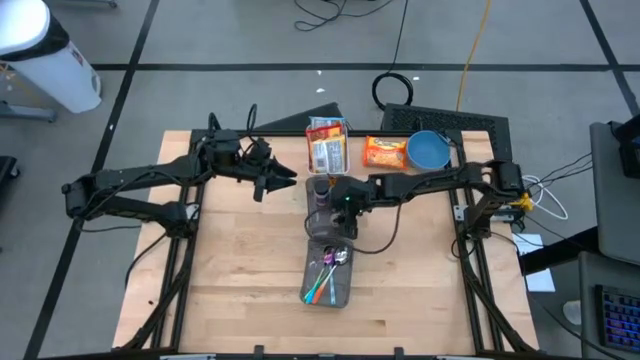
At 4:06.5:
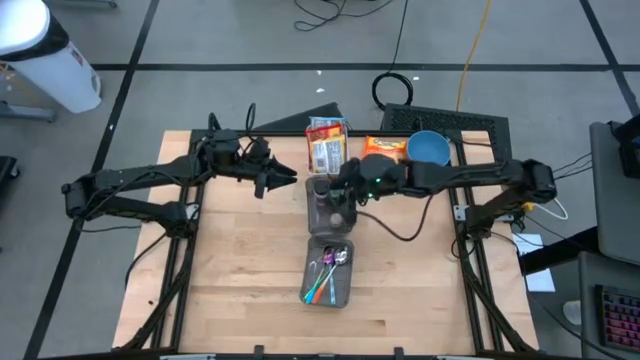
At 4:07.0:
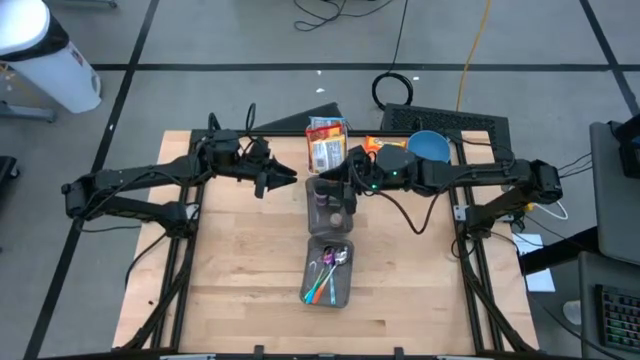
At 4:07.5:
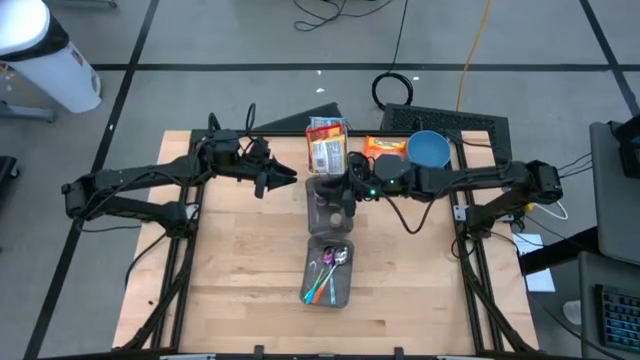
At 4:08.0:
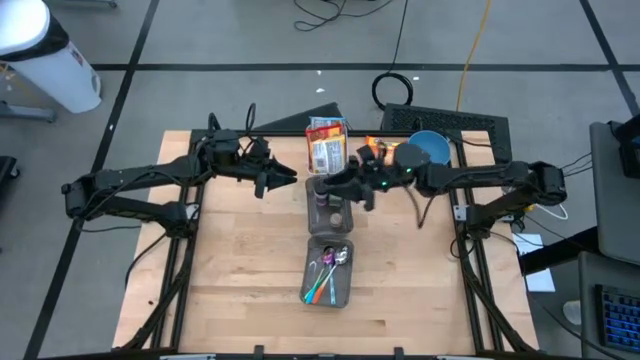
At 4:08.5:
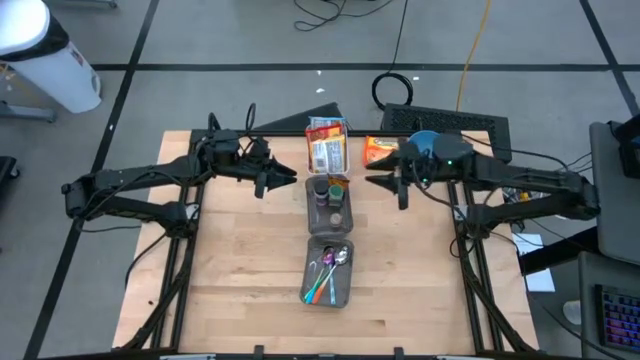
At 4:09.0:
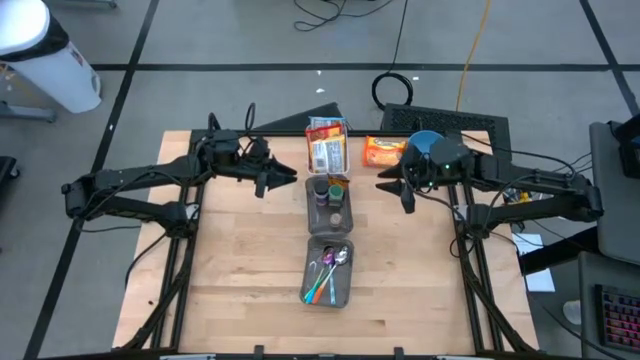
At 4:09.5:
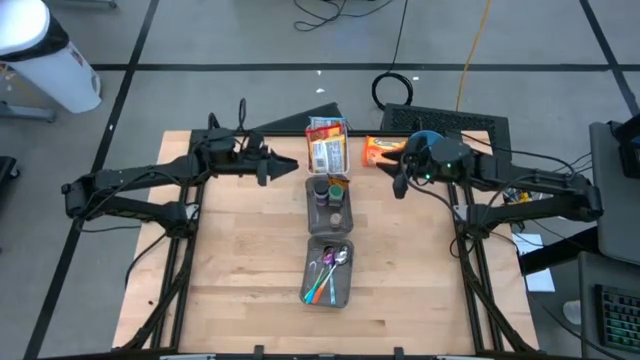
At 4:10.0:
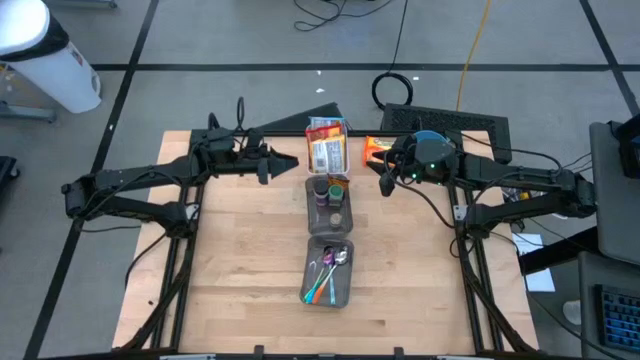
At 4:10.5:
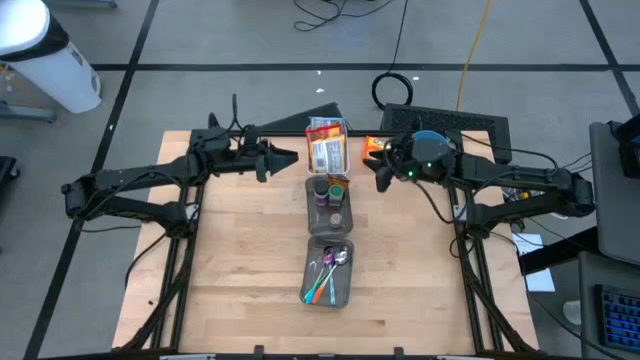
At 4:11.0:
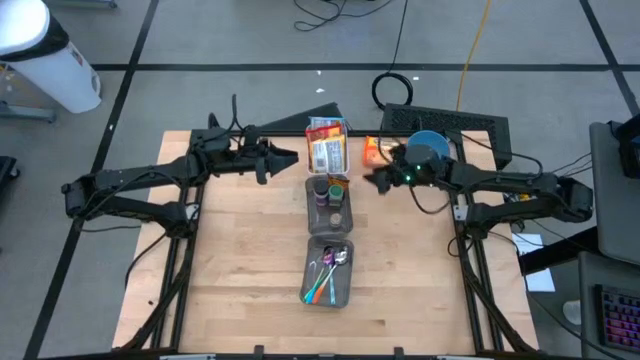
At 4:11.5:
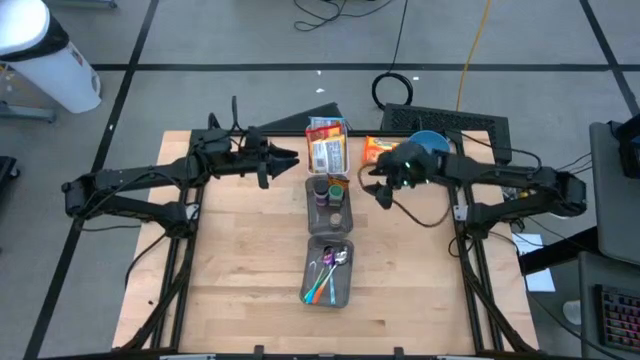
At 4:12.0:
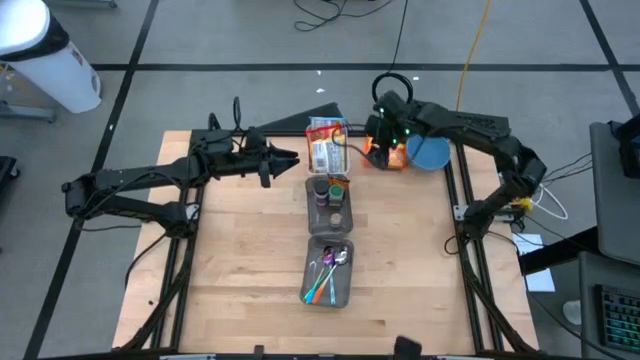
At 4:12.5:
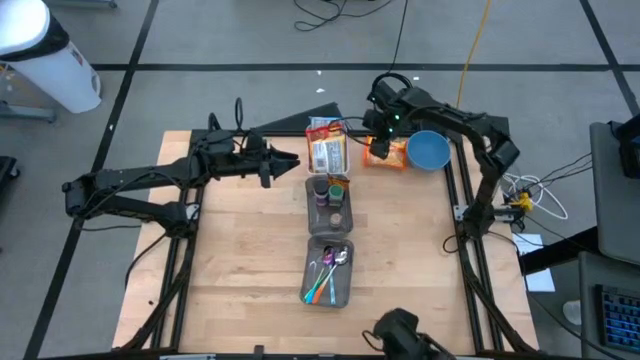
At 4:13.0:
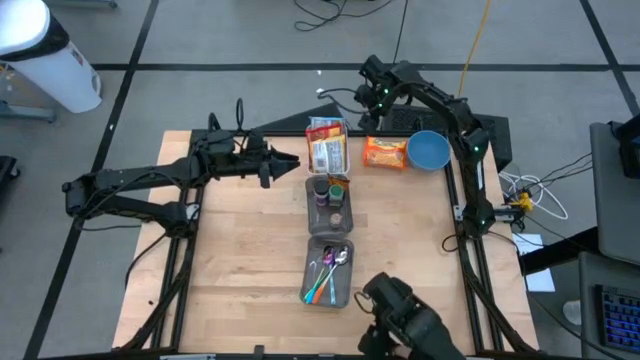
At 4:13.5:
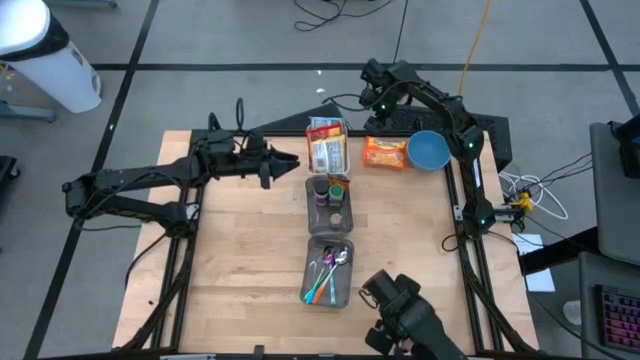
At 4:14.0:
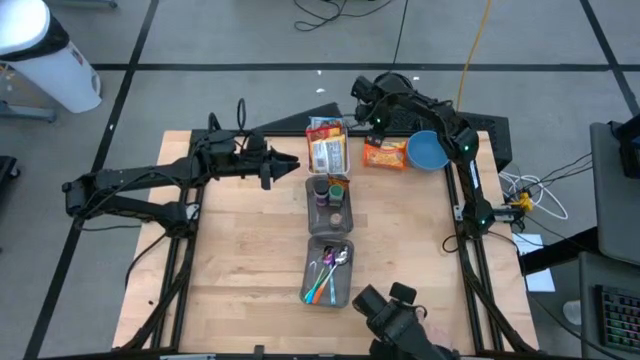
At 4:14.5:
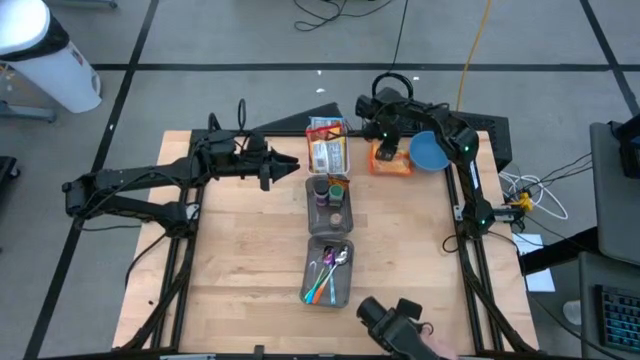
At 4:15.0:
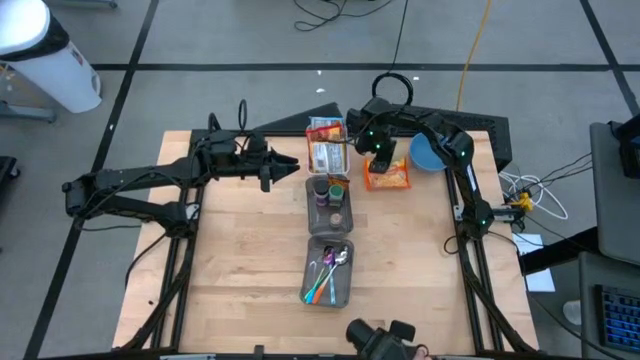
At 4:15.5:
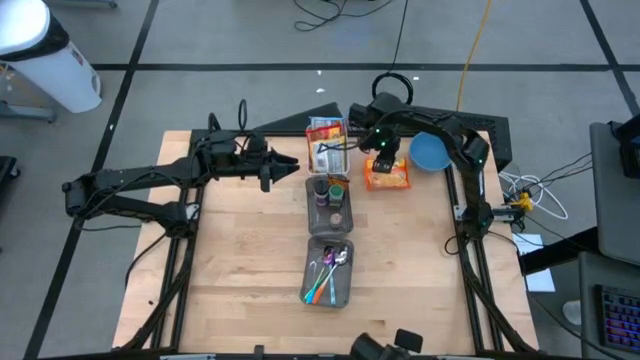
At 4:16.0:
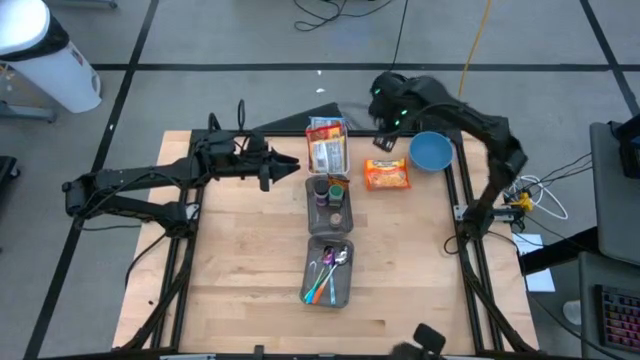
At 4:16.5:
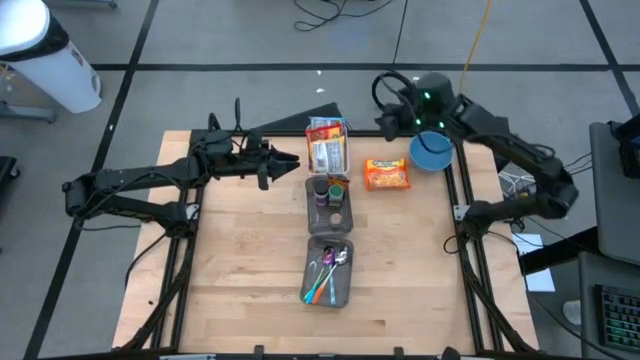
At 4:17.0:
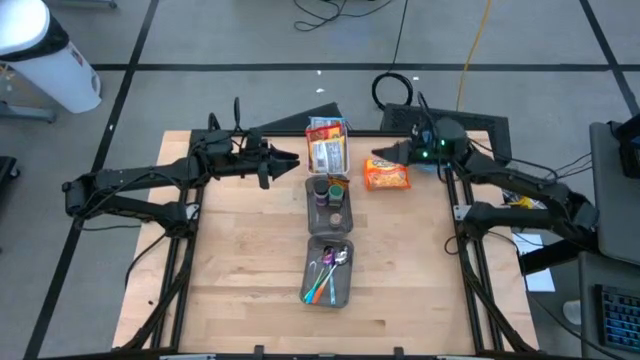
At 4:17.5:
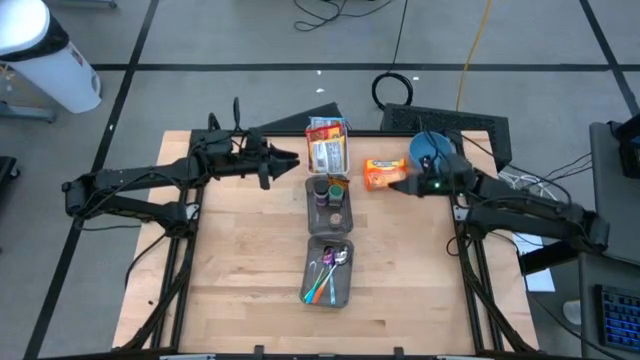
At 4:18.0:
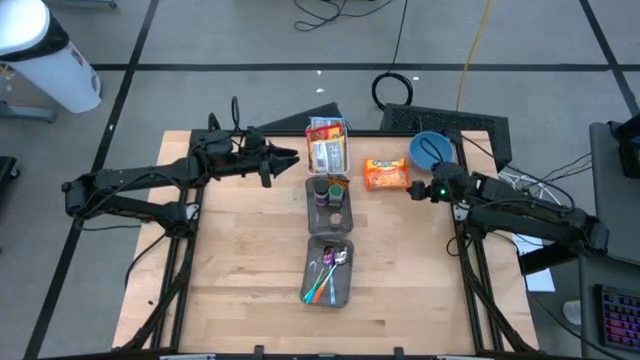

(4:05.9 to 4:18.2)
Task: Pick & Place Food Item
Put the orange noodle pack into the white bin

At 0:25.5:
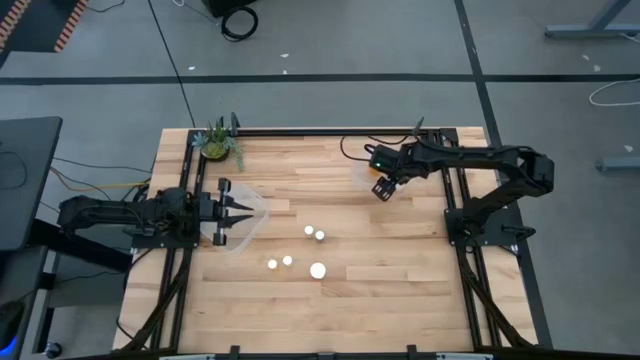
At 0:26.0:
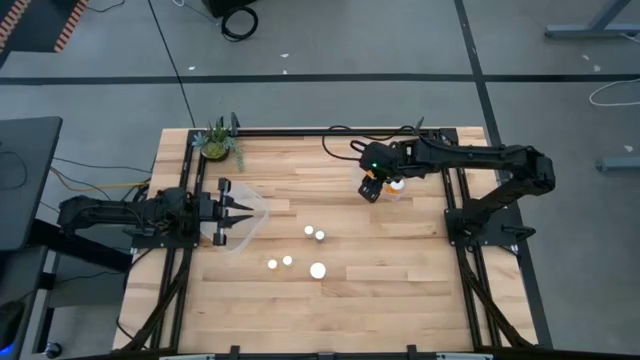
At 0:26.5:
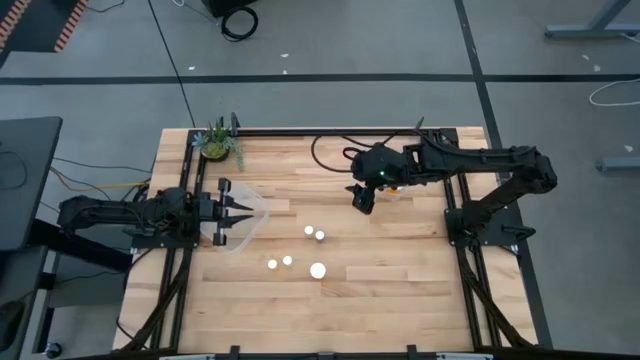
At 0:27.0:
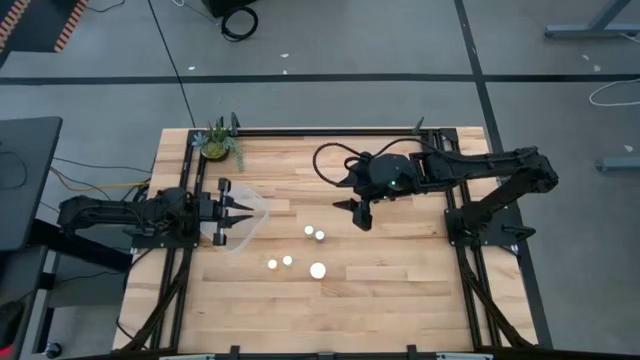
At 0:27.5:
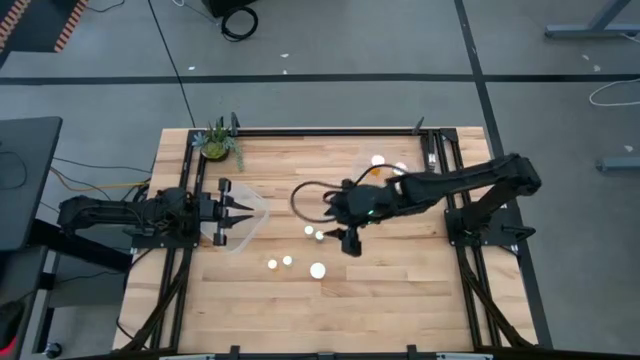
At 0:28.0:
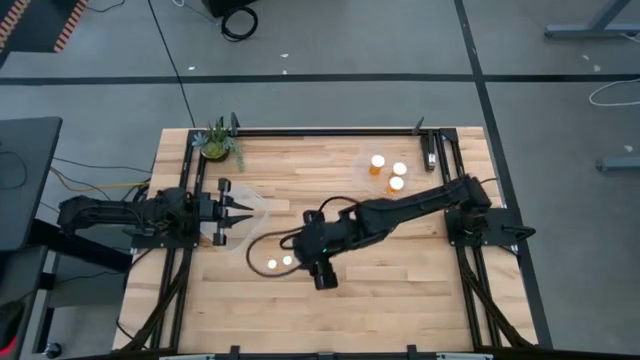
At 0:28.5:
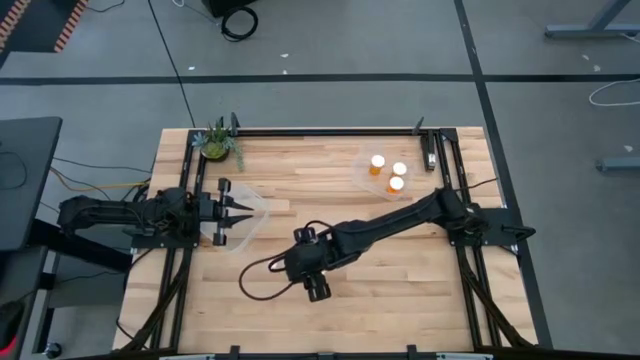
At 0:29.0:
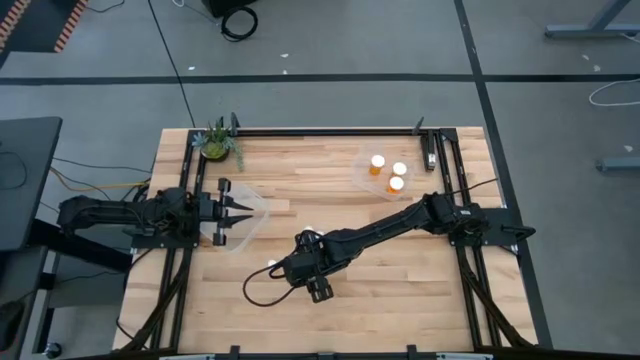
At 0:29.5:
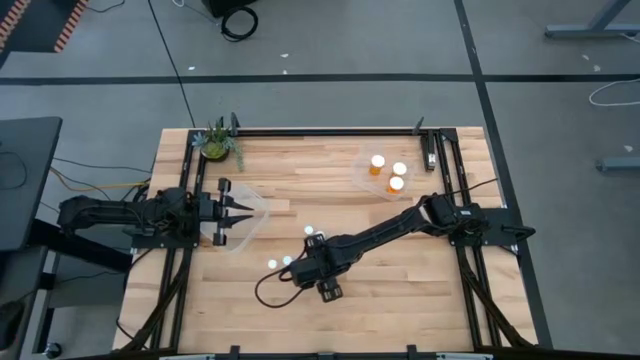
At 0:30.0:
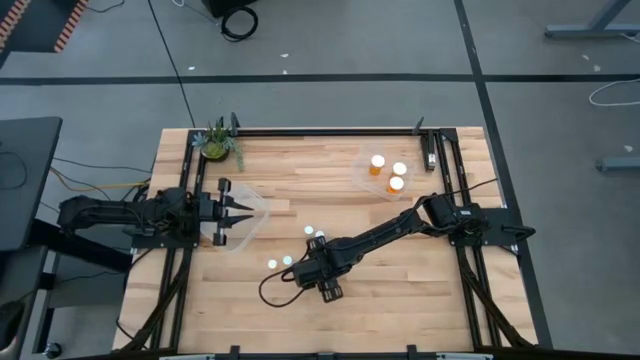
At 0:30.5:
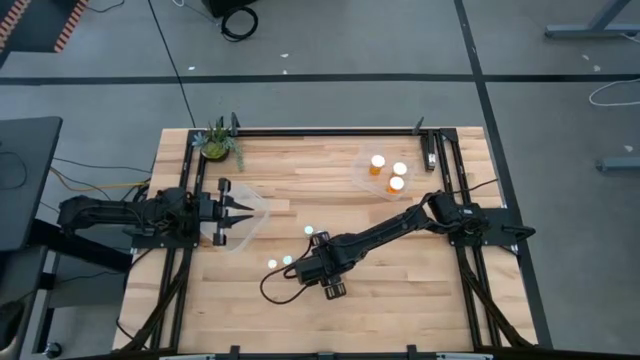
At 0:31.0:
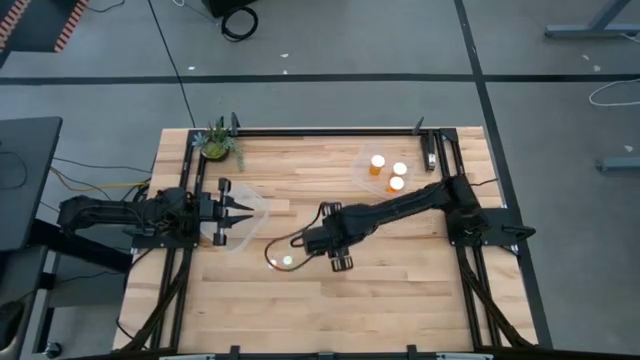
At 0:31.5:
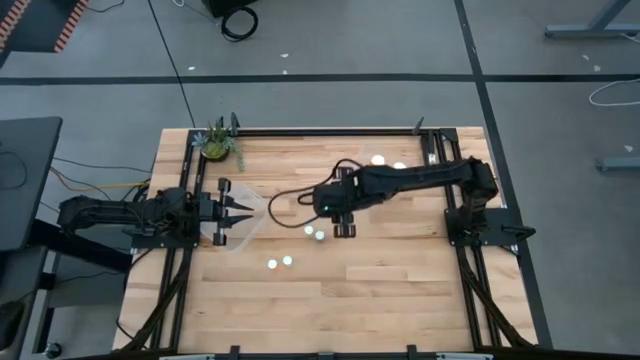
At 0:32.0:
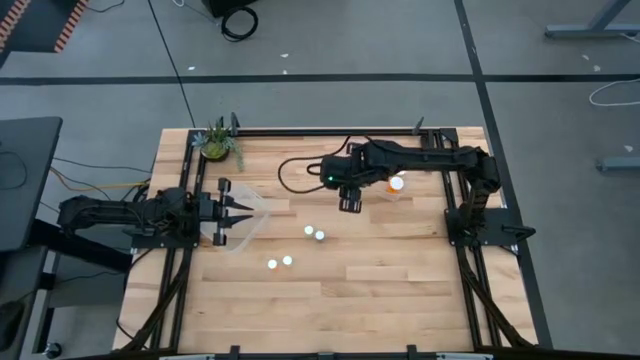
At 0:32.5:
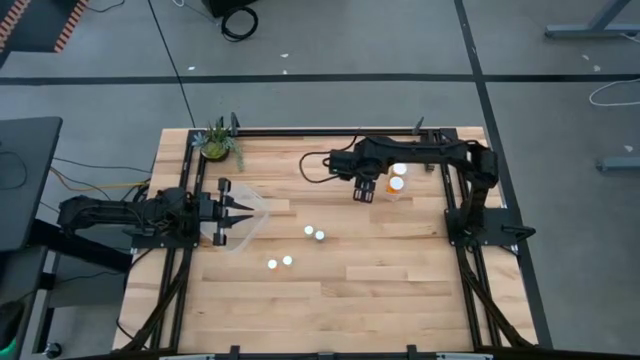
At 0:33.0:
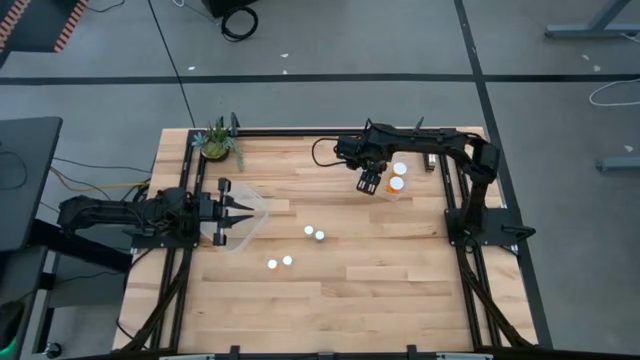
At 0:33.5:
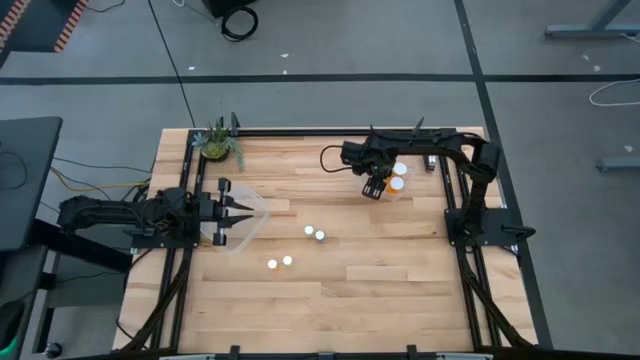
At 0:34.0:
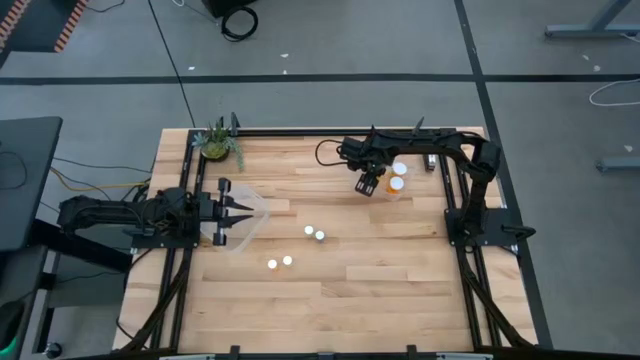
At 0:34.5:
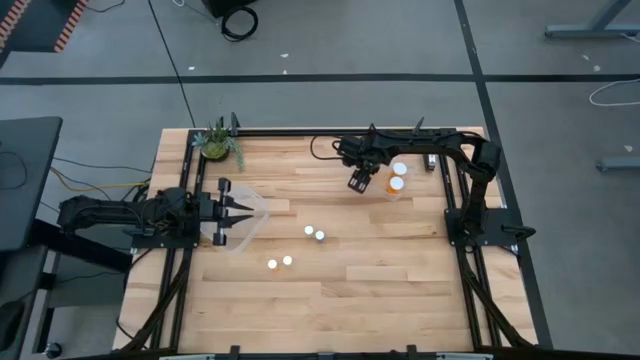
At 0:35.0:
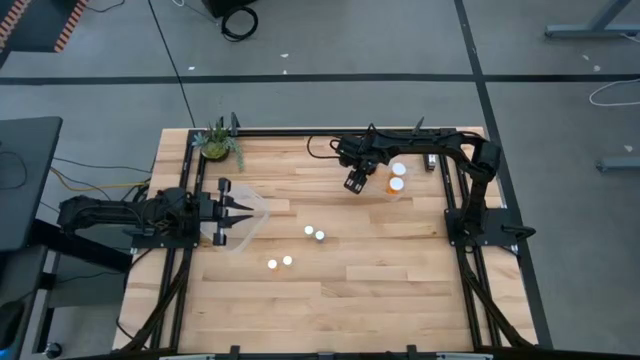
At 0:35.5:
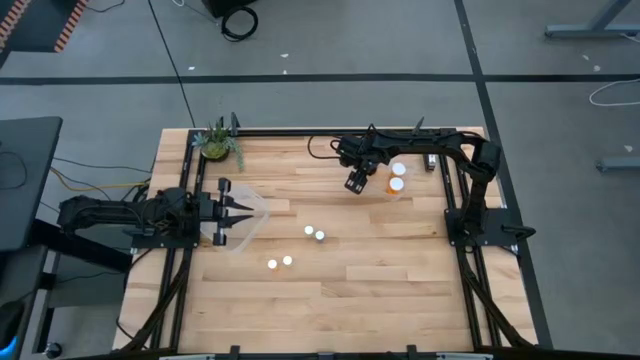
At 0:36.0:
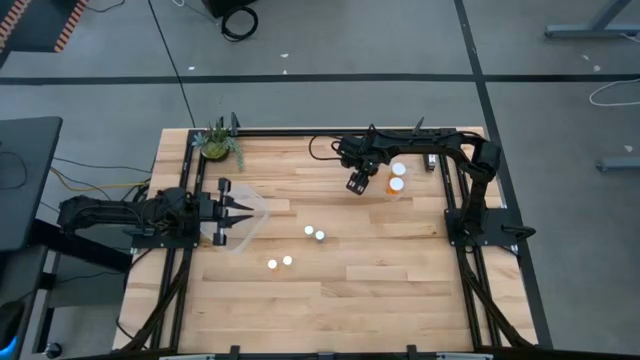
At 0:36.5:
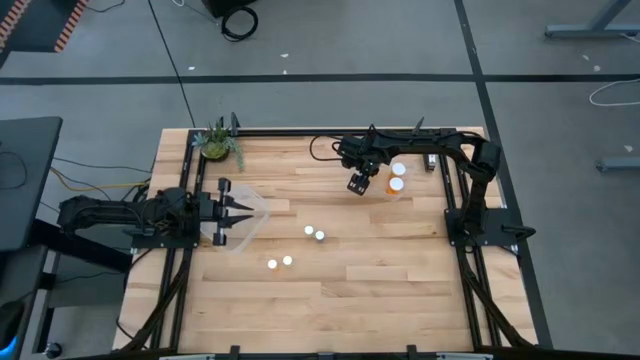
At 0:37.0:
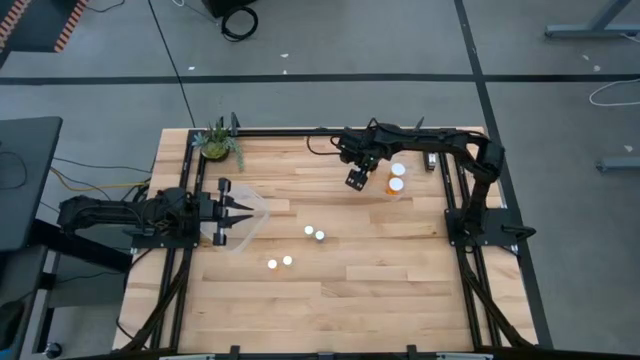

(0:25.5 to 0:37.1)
Task: Pick and place medicine bottles into bin by pill shape (circle, oval)
Put the large orange pill bottle into the right transparent bin
